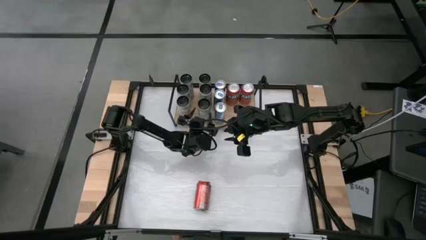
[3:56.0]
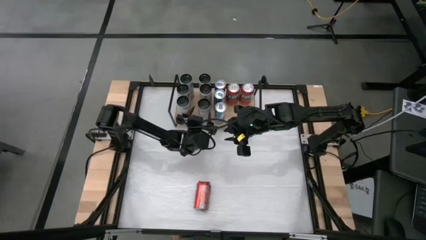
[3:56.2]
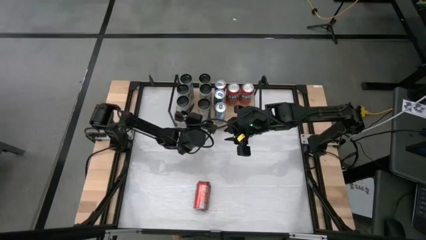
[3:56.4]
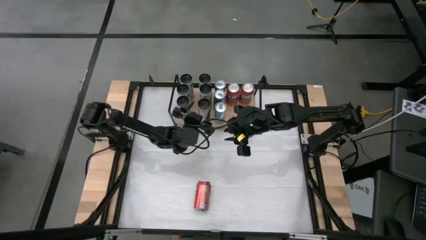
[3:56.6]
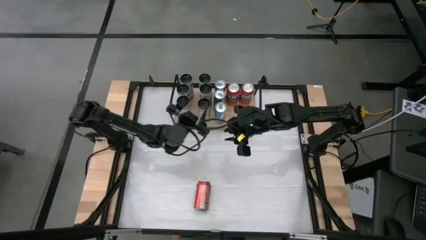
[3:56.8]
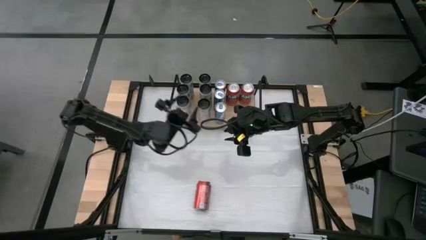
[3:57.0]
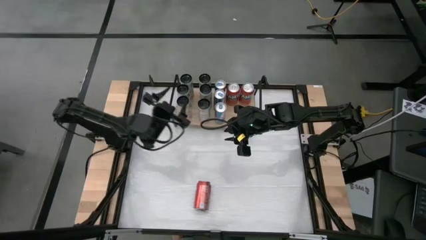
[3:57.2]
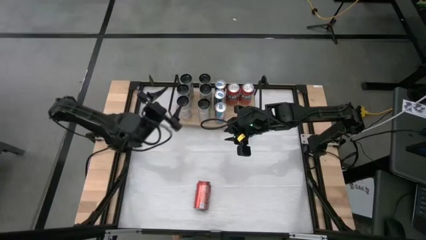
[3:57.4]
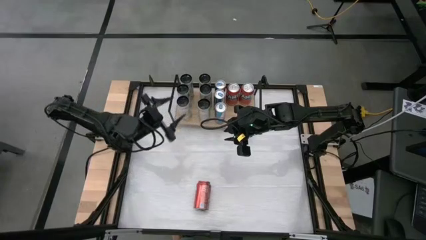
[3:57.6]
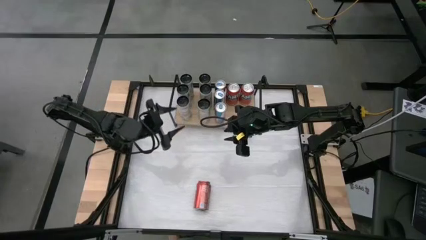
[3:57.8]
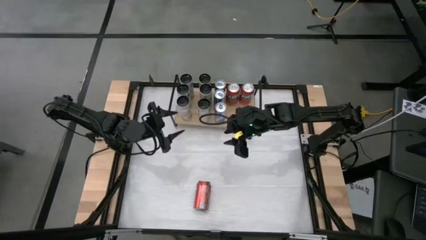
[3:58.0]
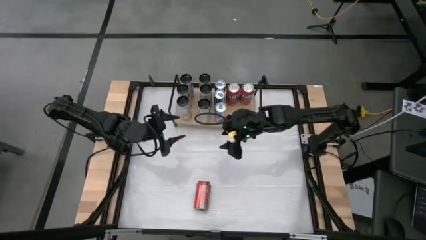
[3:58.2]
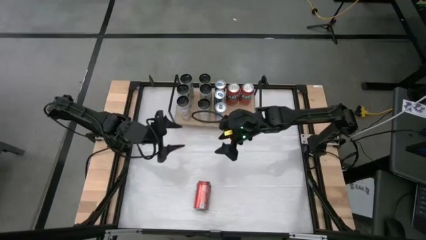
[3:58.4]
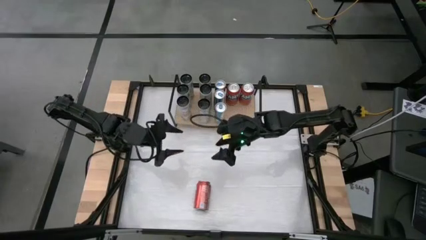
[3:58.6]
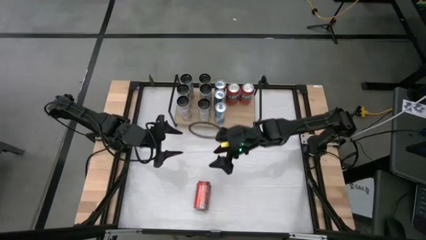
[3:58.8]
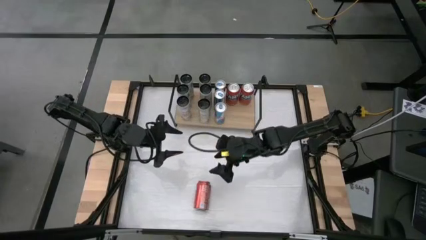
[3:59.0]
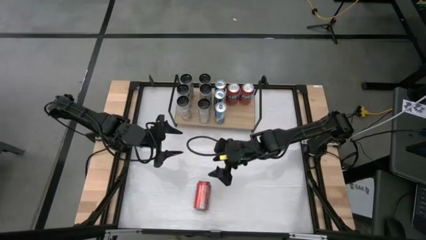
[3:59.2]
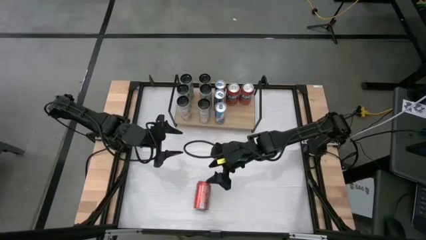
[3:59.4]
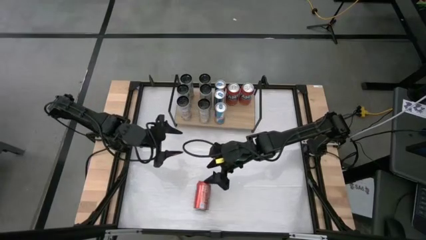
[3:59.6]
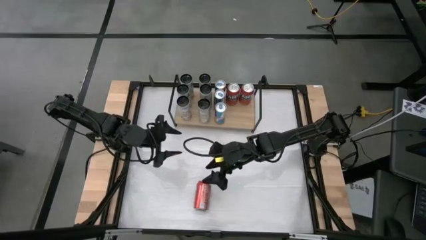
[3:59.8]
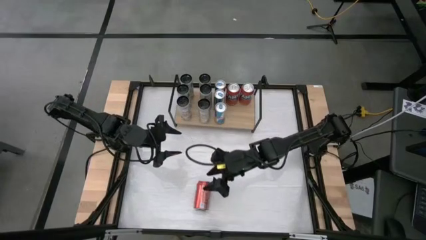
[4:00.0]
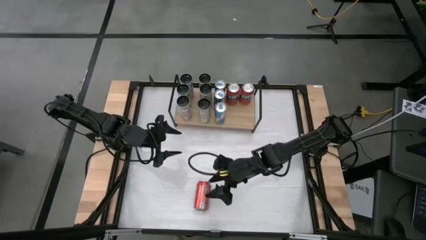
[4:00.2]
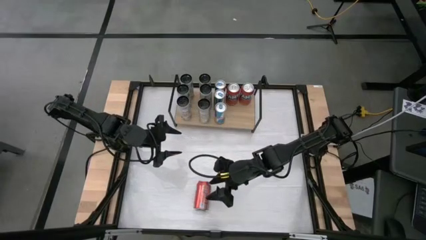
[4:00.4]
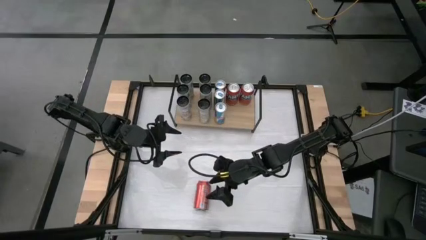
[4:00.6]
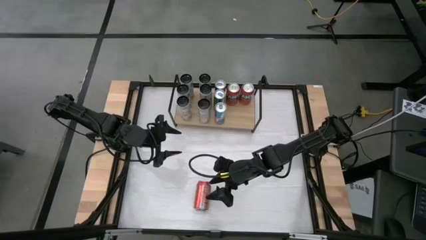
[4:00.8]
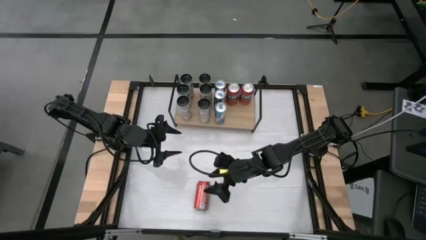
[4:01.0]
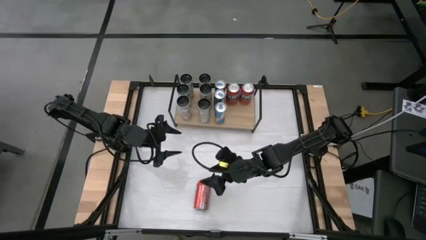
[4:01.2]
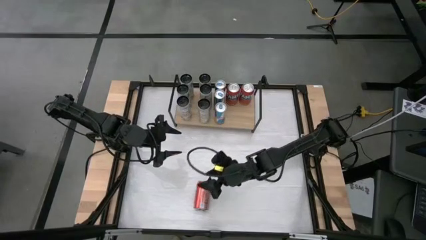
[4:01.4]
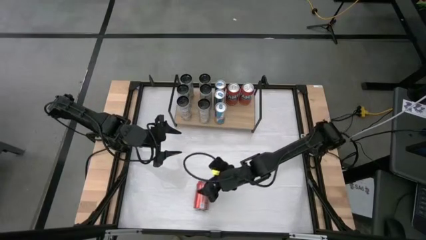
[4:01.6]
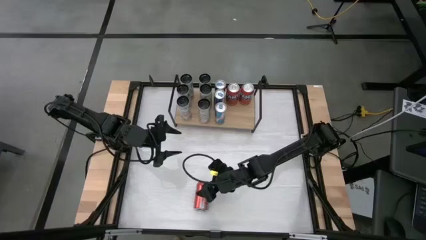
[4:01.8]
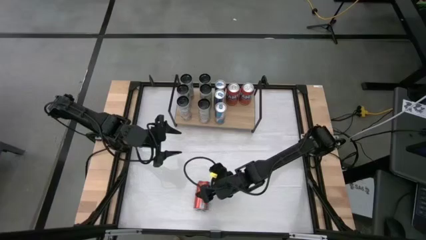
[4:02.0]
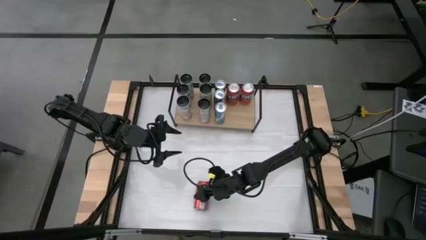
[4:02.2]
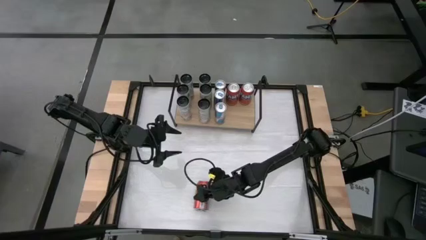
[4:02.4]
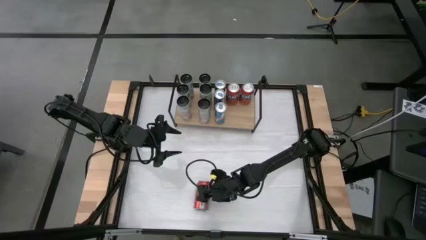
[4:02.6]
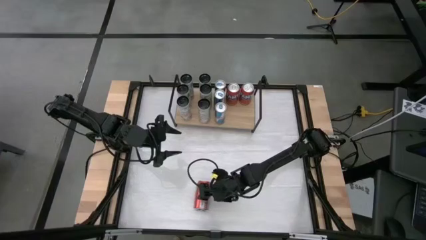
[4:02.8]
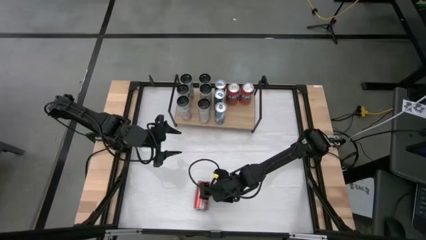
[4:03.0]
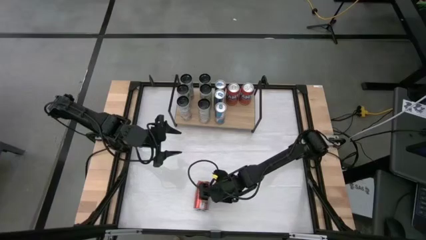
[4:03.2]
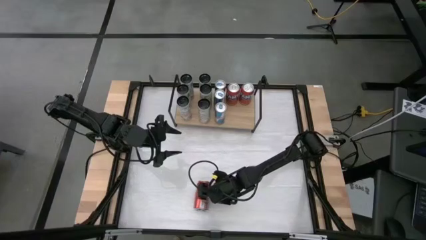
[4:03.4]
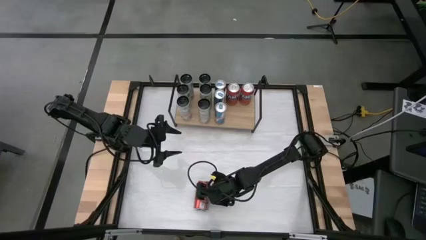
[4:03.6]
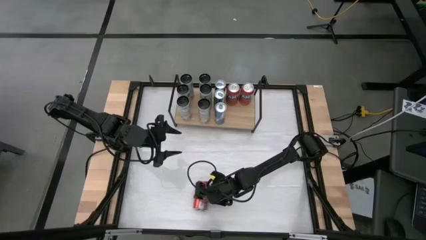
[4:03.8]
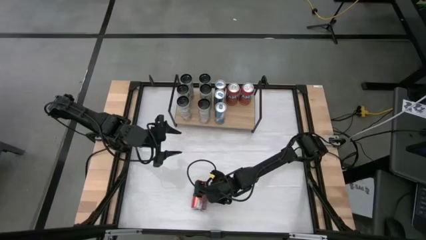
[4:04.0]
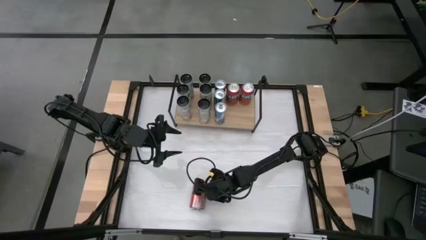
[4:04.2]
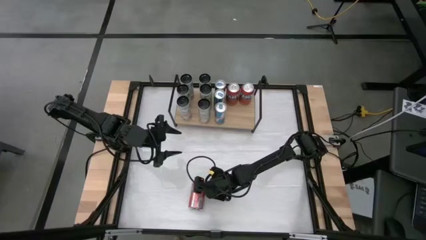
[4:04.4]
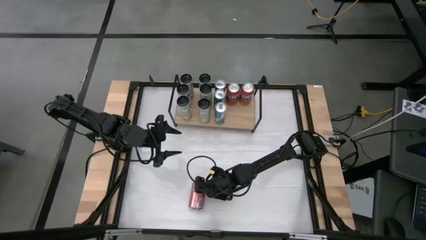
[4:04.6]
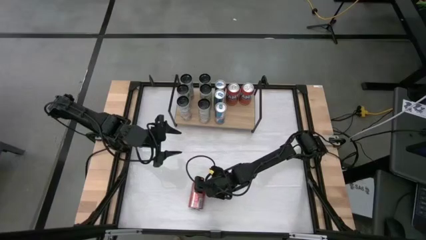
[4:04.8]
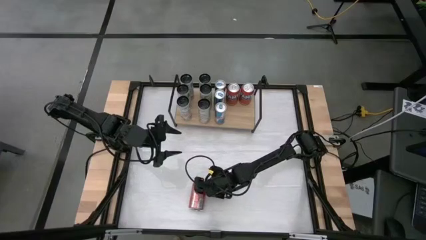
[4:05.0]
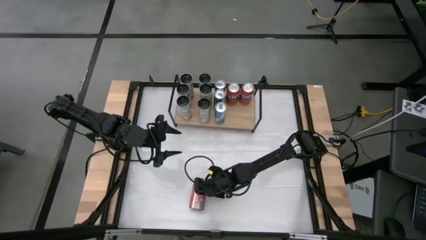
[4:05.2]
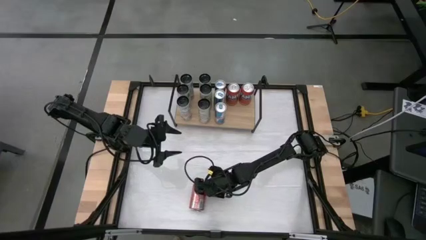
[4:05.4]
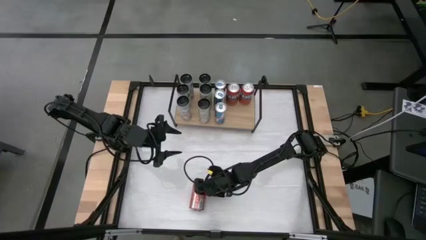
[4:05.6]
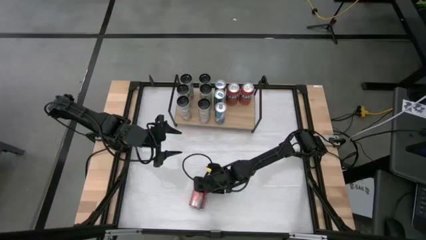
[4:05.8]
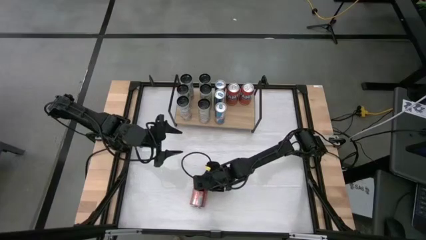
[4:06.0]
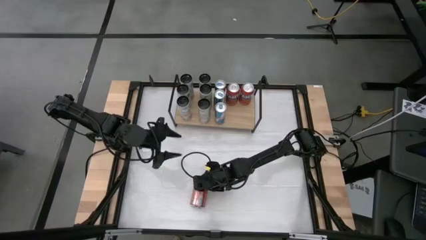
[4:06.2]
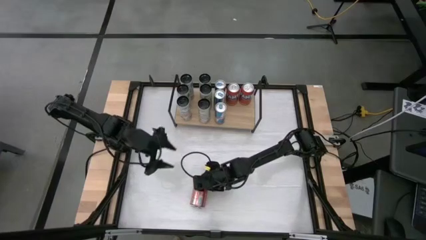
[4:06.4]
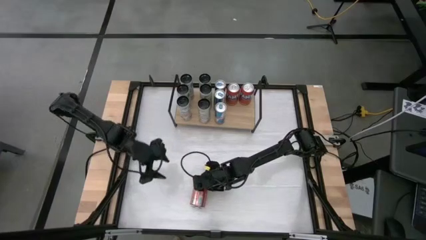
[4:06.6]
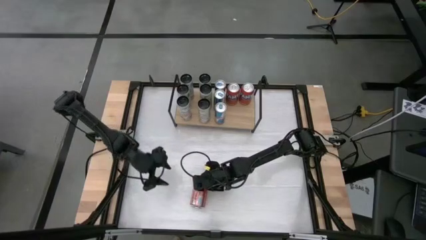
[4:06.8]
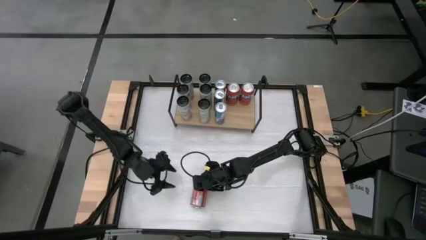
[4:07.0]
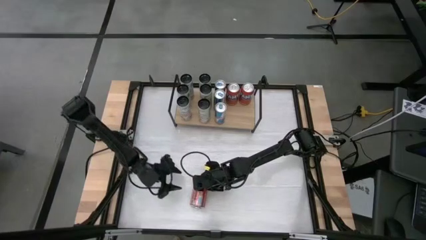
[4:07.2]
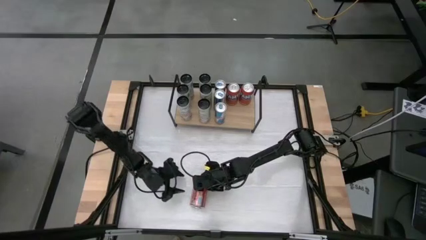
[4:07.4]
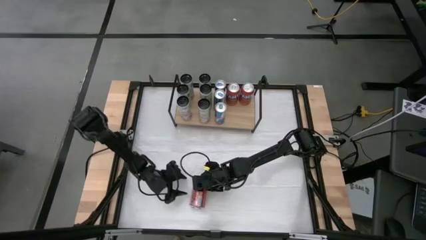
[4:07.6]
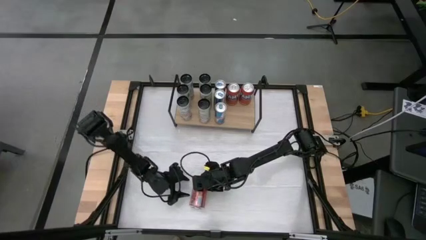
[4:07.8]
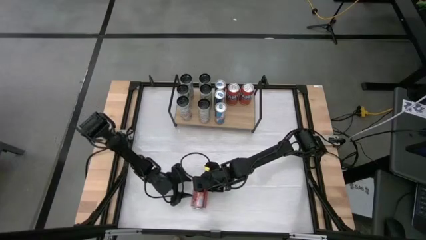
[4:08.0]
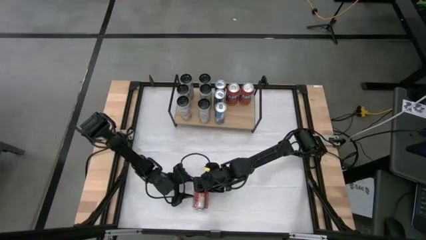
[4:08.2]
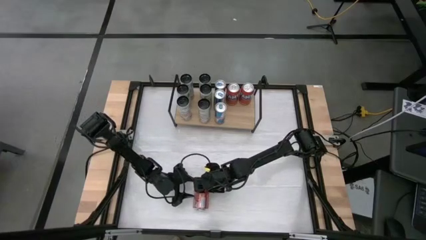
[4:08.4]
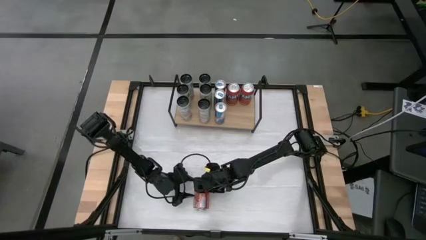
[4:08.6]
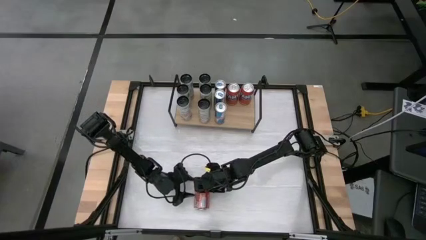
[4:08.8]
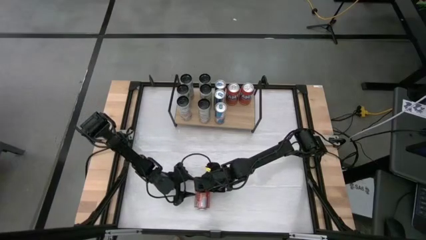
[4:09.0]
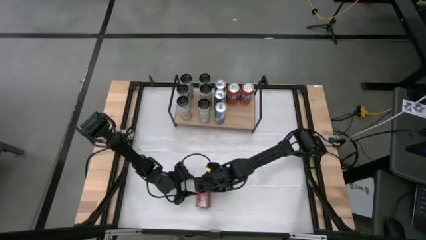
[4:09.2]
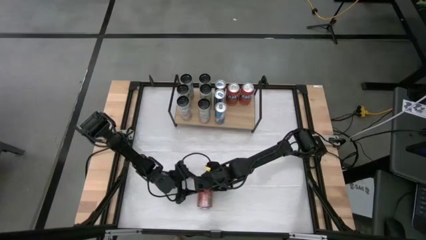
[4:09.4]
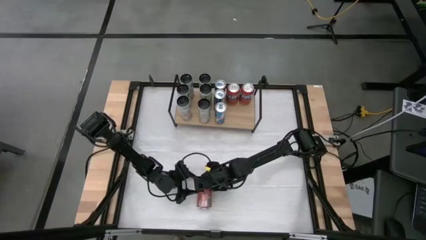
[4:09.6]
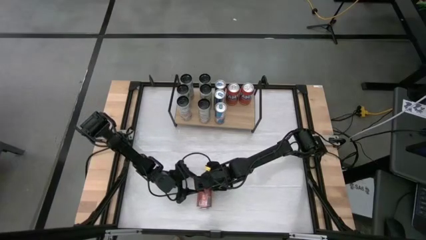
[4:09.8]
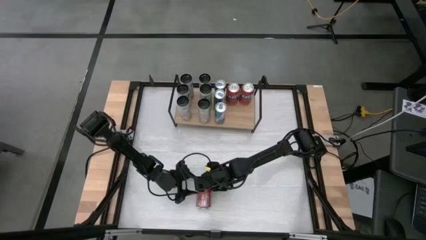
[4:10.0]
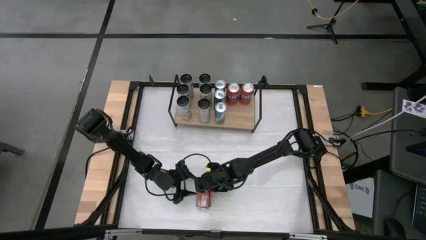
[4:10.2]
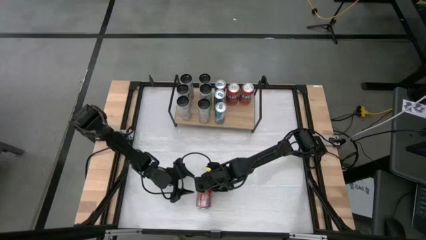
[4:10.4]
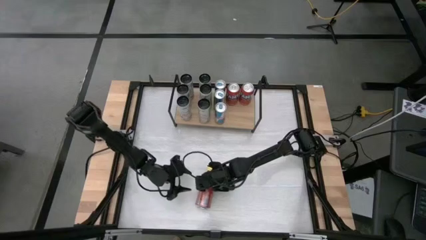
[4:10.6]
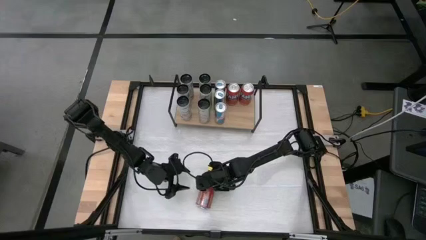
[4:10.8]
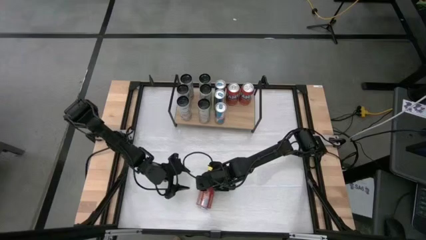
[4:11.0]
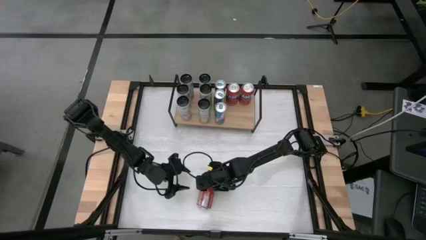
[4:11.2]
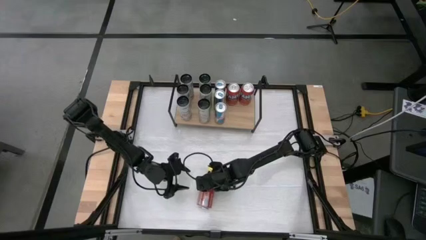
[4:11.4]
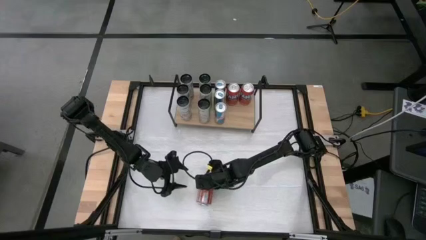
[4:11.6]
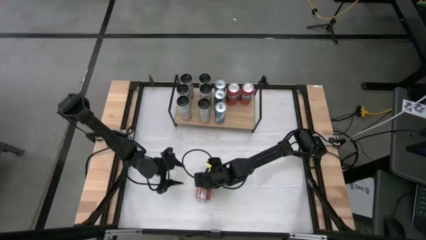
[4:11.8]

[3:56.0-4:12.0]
Task: Place canned beverage on shelf
Put the red soda can on the shelf
